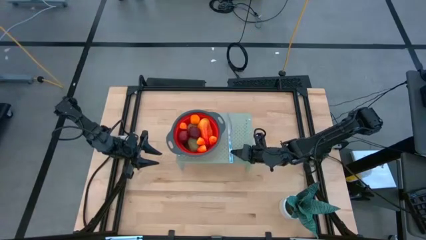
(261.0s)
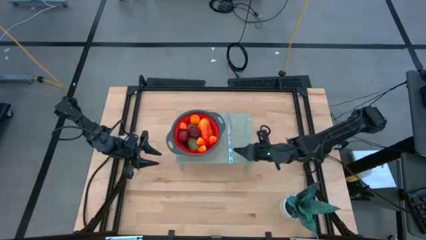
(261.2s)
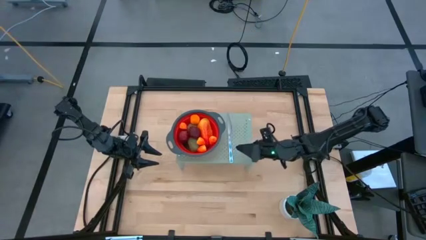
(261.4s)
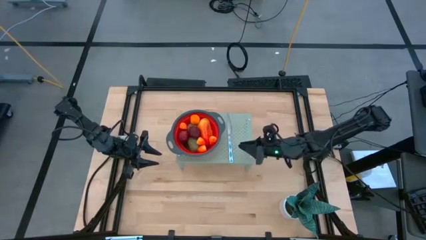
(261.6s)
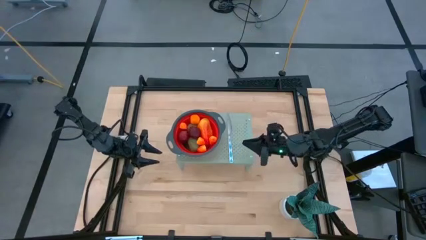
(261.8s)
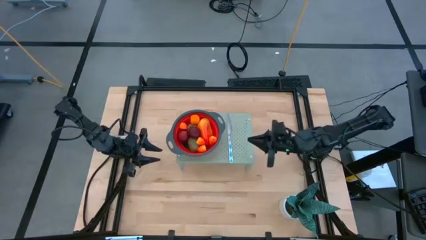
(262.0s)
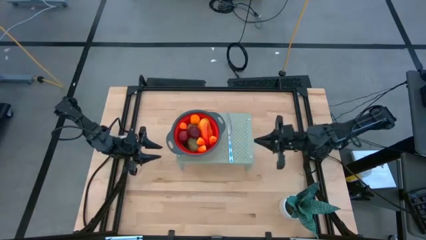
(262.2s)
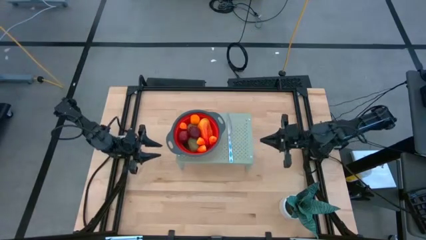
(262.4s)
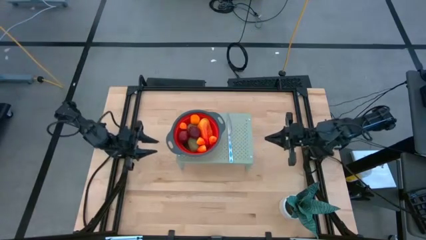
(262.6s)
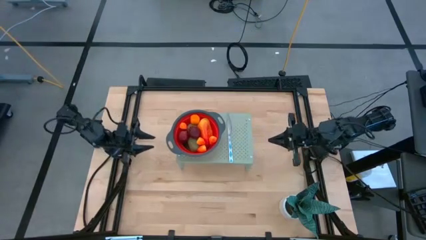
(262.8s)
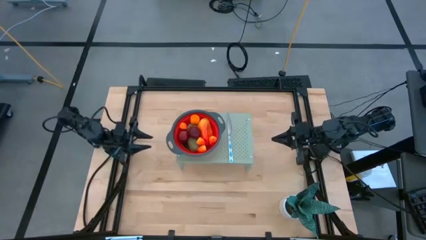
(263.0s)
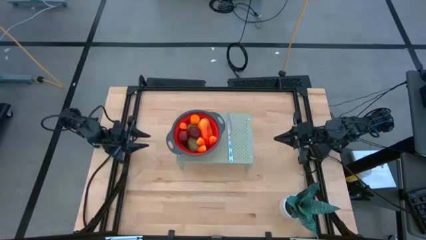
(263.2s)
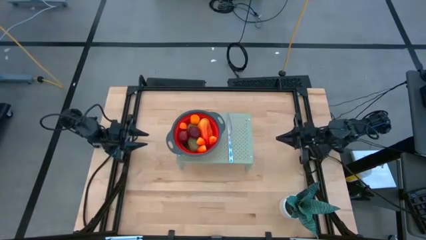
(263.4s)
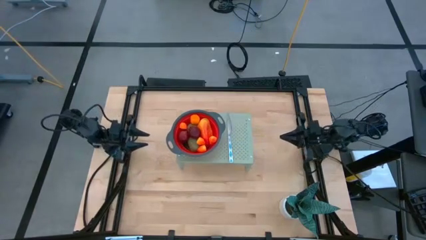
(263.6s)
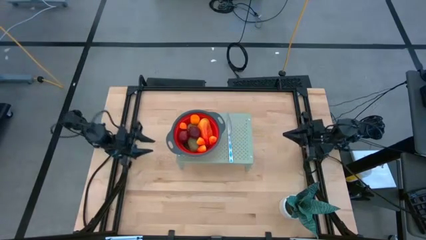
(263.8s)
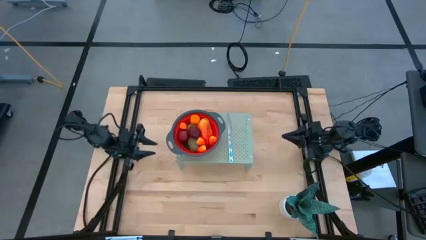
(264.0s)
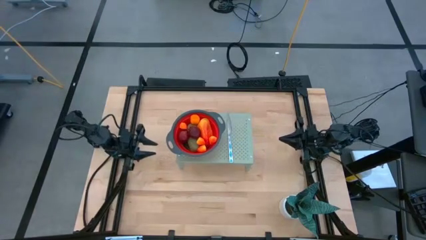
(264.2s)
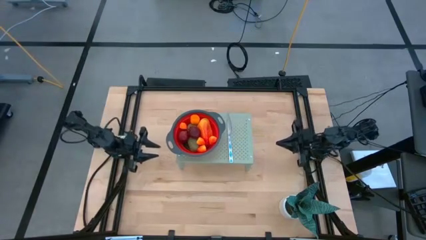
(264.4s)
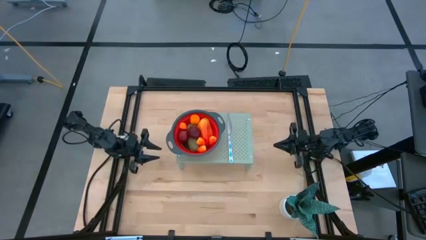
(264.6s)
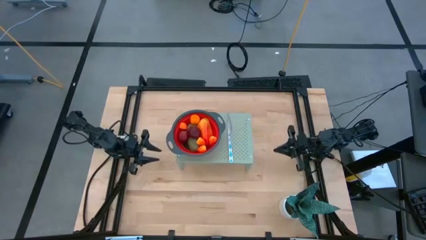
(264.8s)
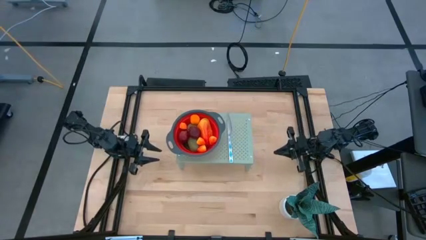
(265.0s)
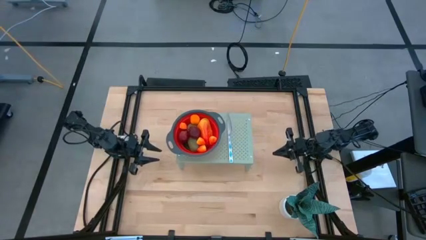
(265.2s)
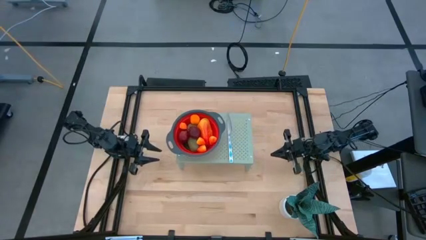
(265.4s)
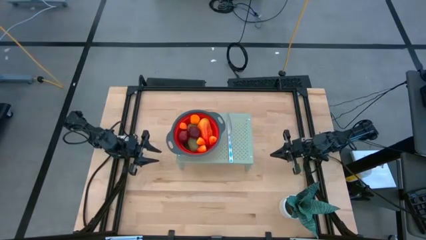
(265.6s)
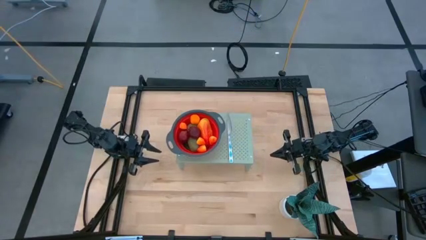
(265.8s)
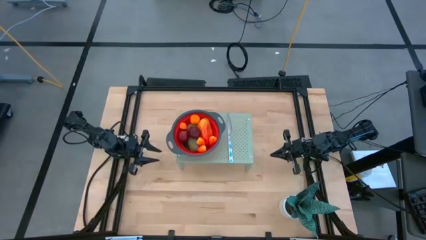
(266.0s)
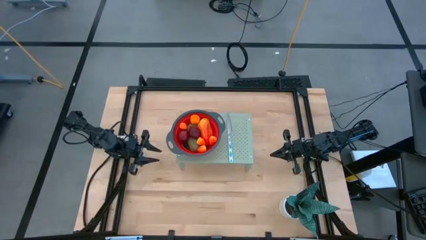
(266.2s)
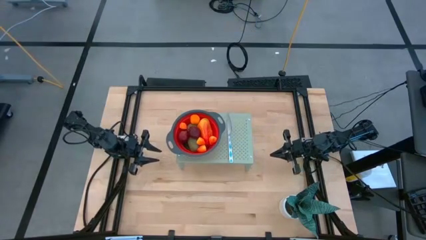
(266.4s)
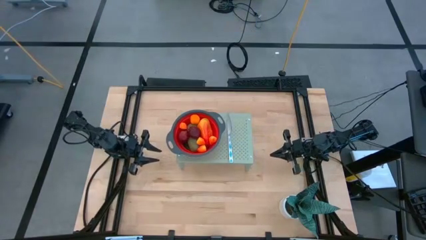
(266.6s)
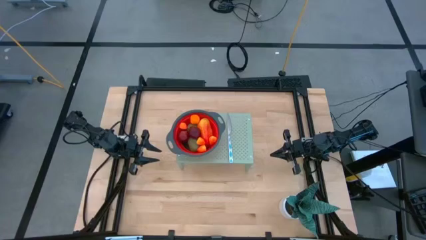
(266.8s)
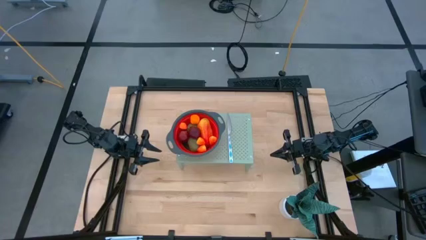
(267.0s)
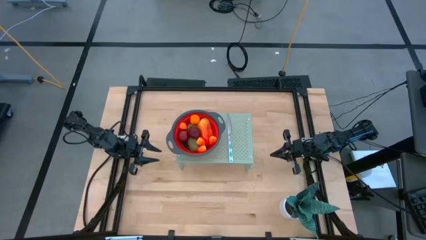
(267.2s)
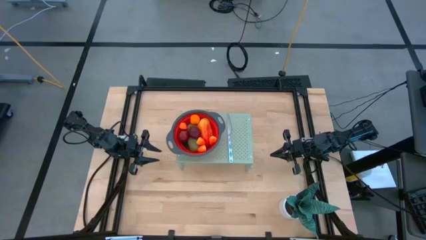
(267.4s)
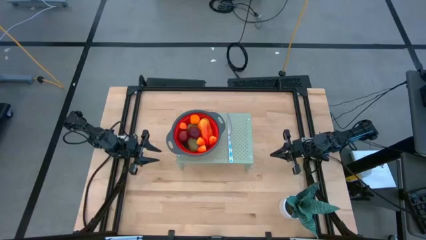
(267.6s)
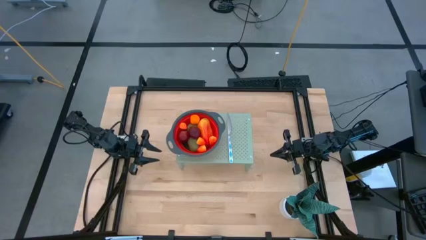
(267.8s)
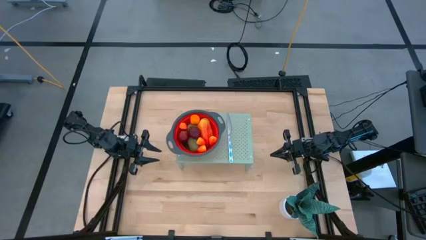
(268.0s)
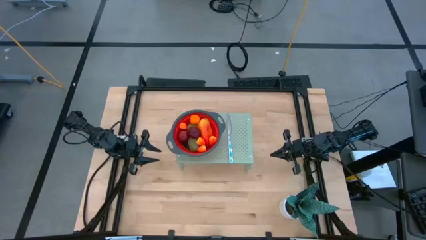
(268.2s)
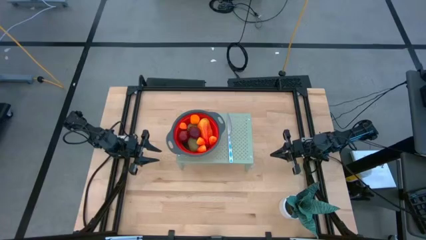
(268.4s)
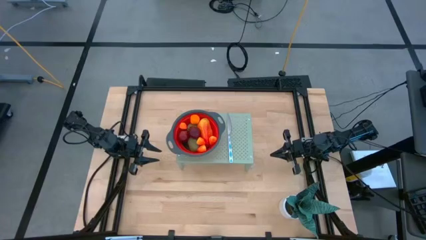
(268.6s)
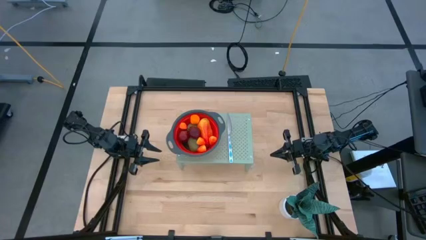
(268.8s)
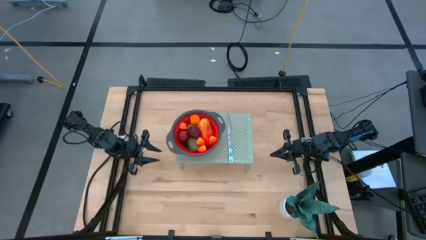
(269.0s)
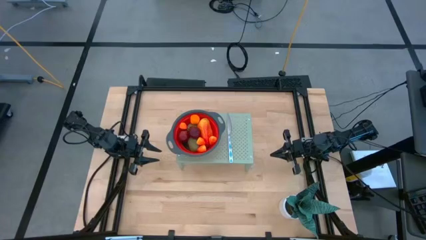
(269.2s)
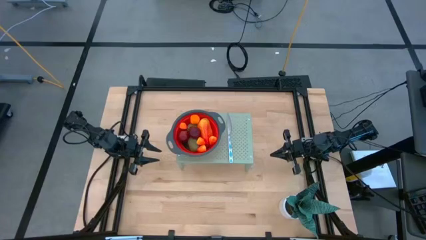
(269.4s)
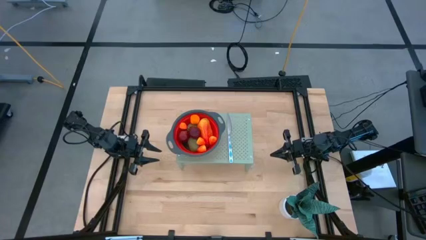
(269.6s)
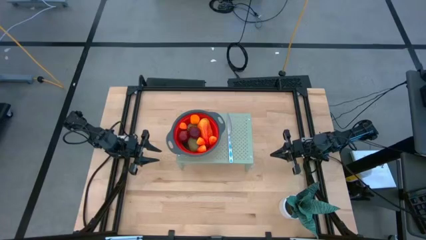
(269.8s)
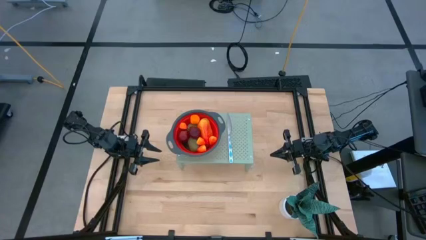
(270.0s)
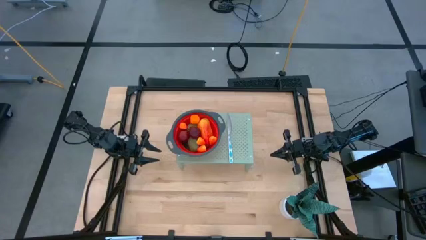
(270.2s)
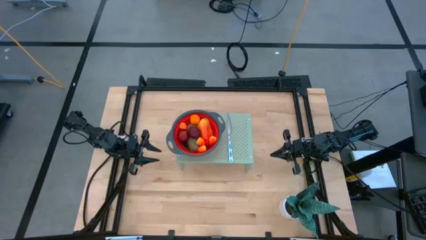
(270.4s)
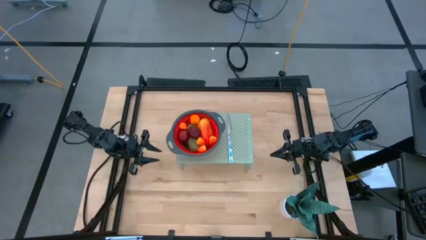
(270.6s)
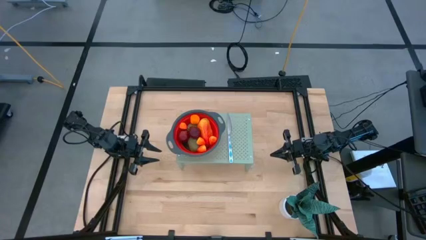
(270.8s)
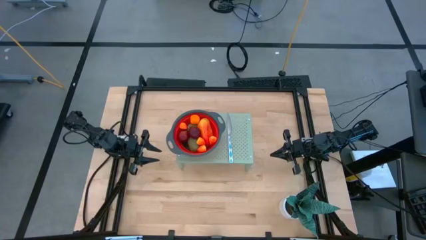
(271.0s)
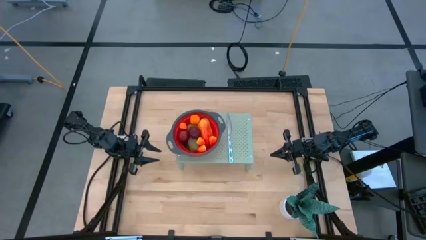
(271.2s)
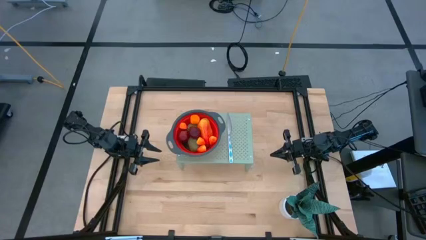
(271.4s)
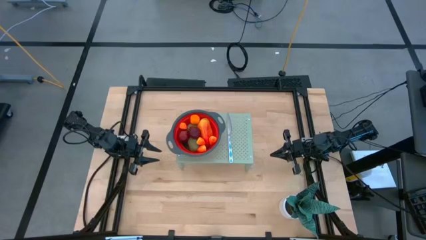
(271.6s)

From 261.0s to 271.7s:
Task: Pick & Place Fruit
Return to home position

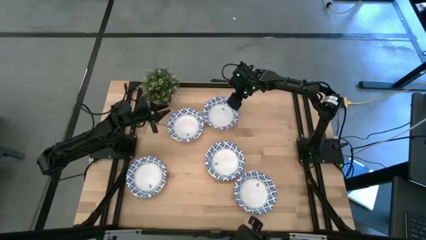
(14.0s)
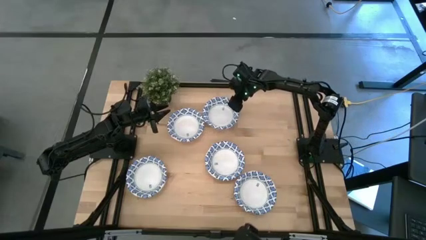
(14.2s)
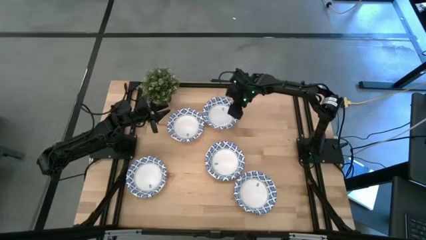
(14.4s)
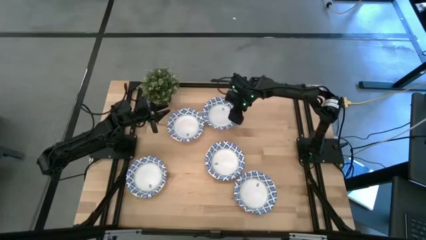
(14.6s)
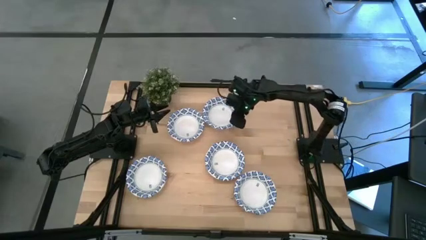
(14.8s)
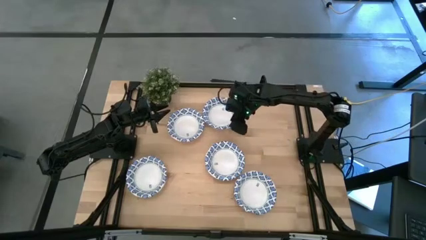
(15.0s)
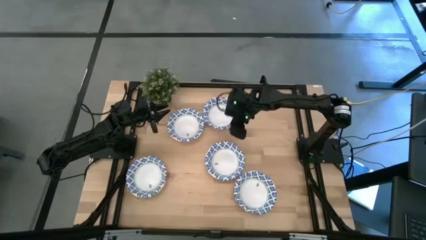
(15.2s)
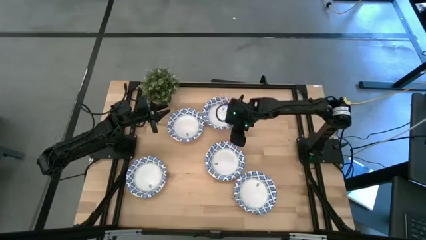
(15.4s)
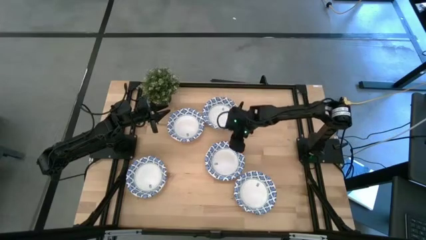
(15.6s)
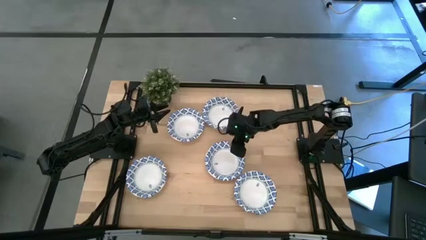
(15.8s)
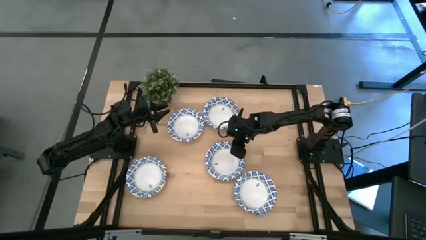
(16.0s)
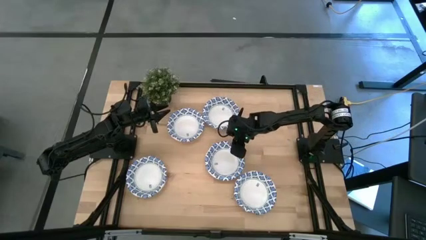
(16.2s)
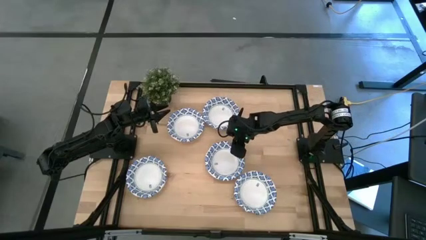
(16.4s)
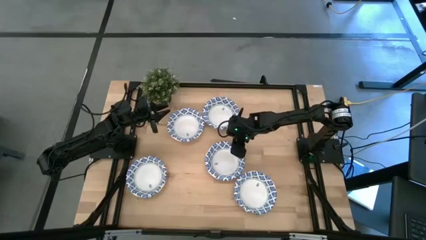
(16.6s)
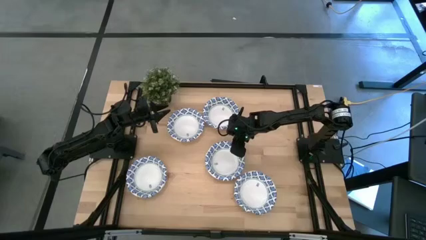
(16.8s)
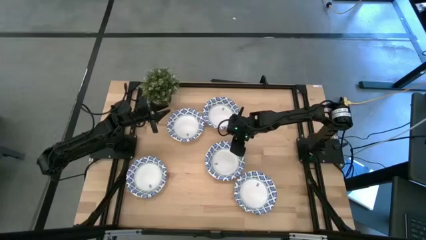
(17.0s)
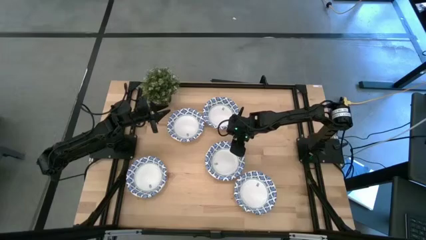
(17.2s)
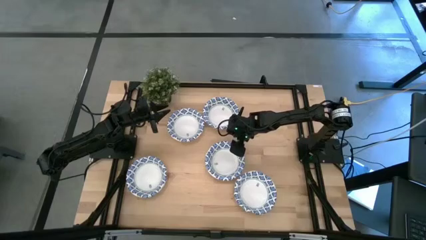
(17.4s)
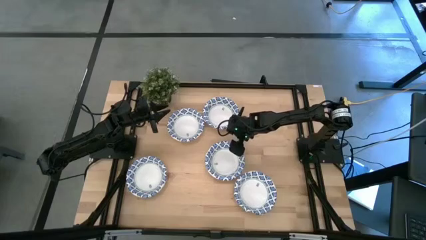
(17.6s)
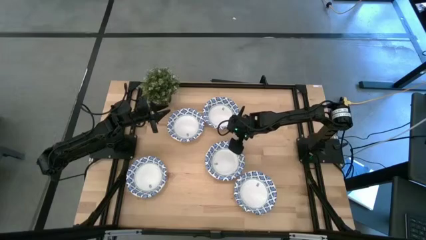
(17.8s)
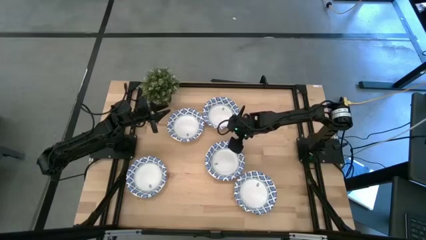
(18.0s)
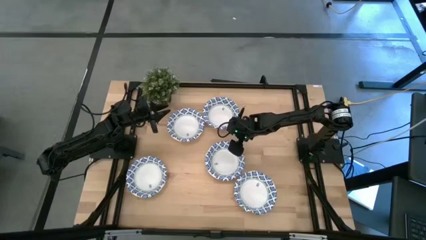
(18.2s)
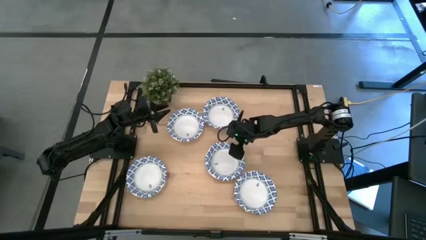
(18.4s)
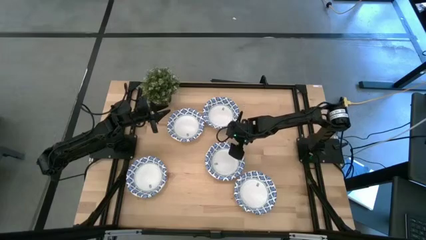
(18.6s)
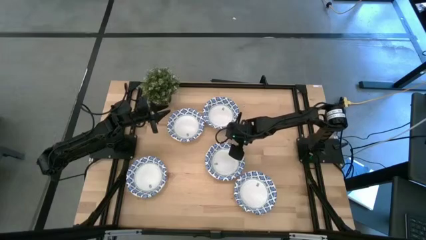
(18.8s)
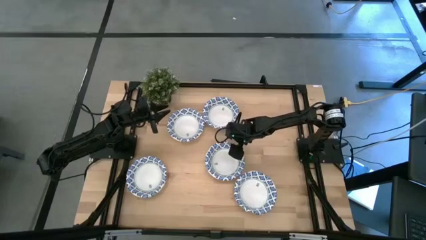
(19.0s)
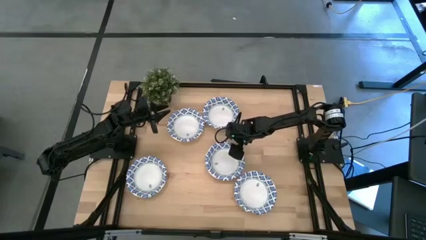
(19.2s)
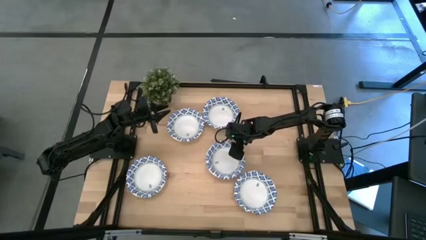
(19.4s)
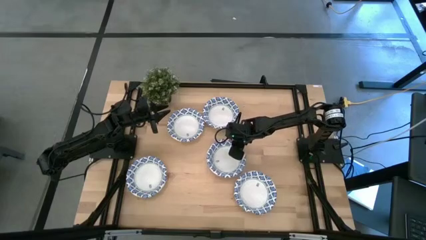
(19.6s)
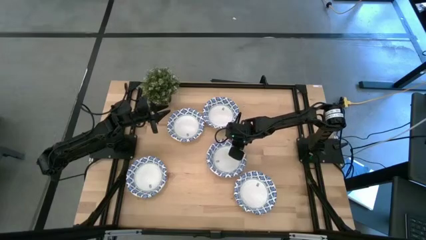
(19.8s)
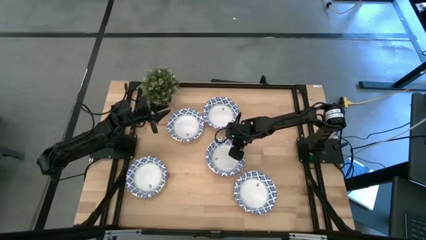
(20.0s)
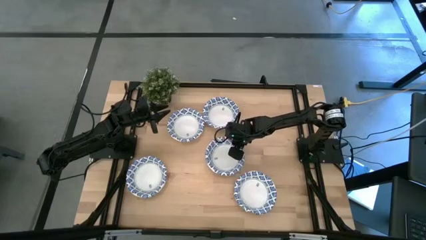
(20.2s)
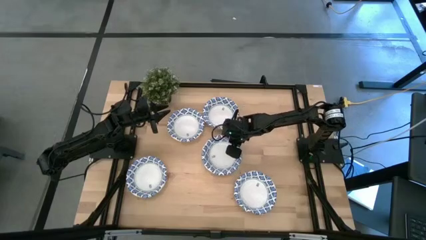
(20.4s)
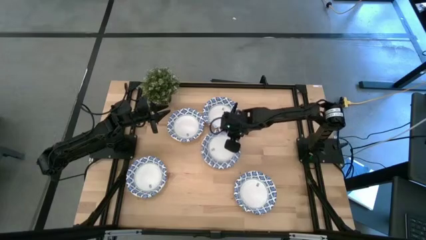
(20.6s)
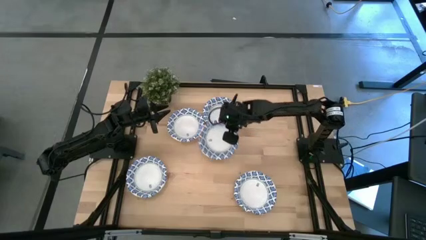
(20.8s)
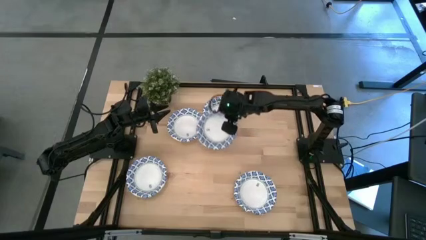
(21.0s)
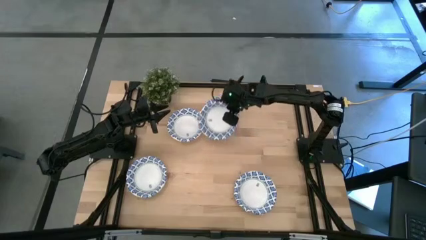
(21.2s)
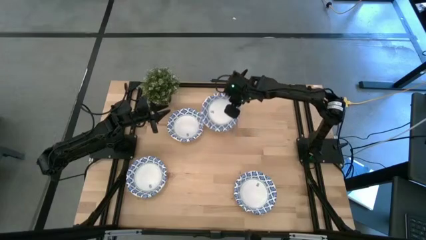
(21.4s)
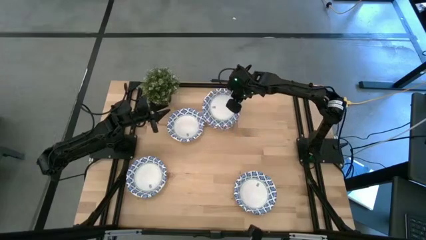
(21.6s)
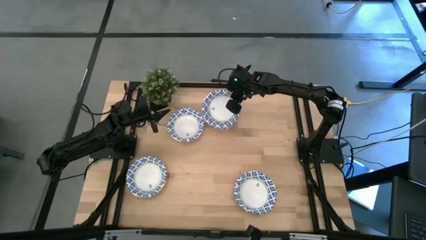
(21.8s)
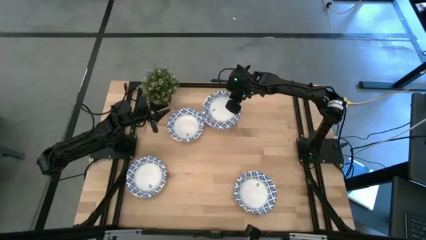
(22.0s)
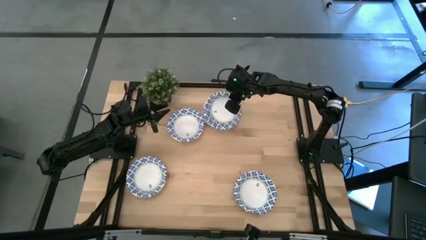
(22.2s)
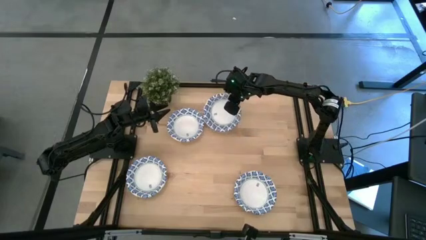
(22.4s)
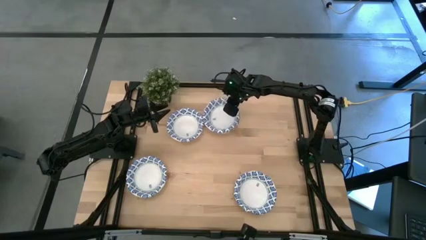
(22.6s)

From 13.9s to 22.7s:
Task: Nest bowls inside each other
Stack the white bowl on the other white bowl
